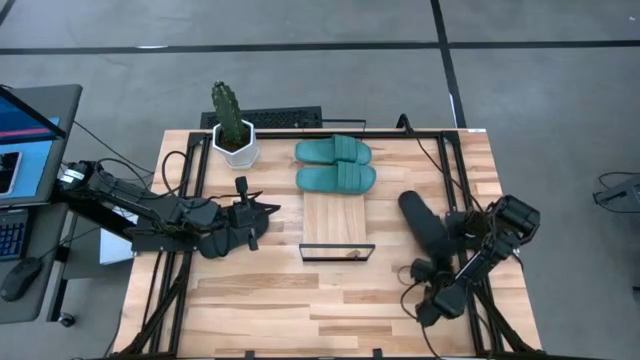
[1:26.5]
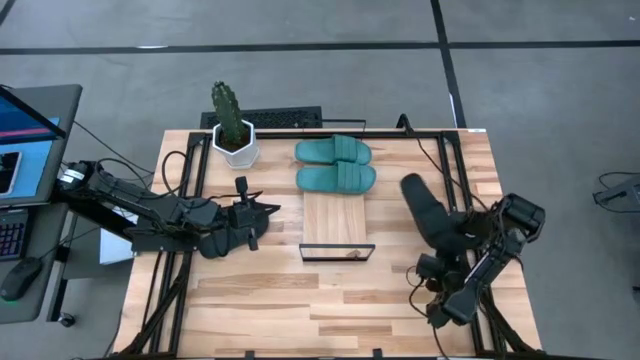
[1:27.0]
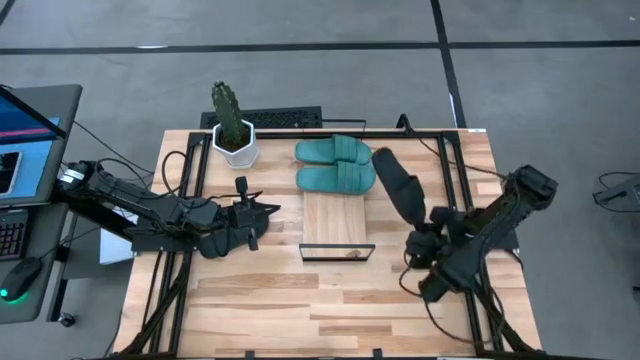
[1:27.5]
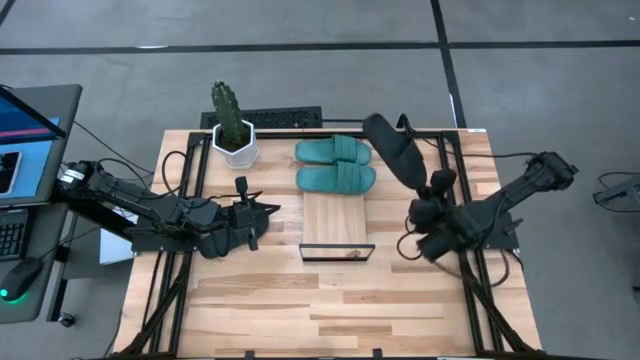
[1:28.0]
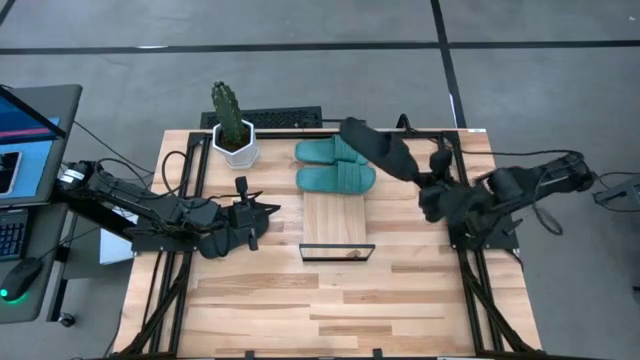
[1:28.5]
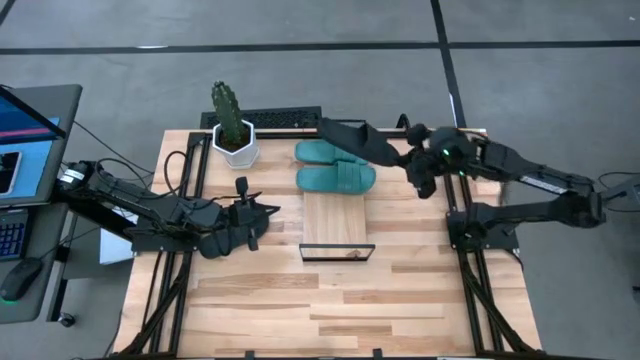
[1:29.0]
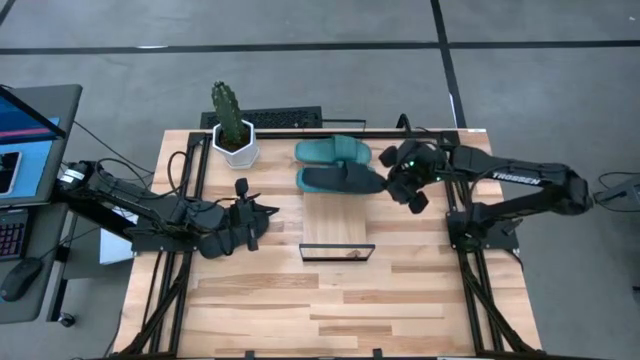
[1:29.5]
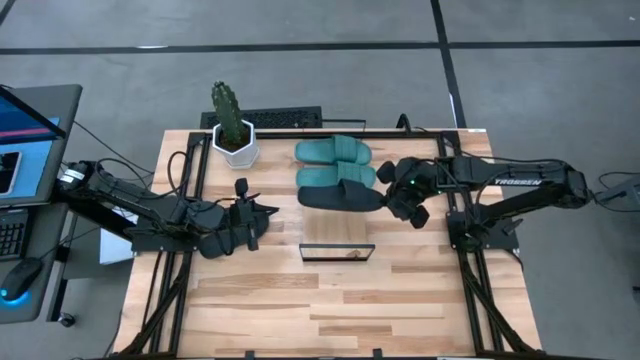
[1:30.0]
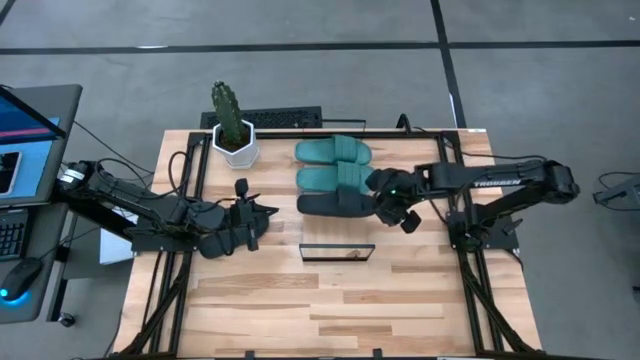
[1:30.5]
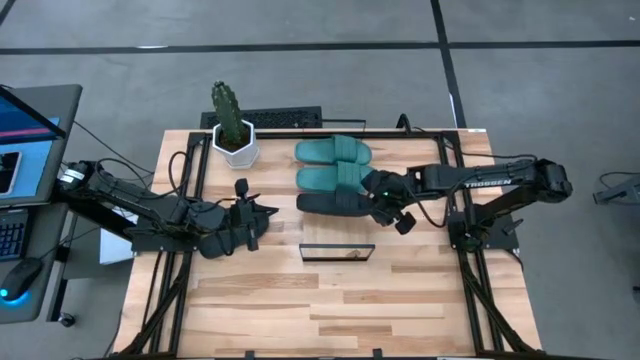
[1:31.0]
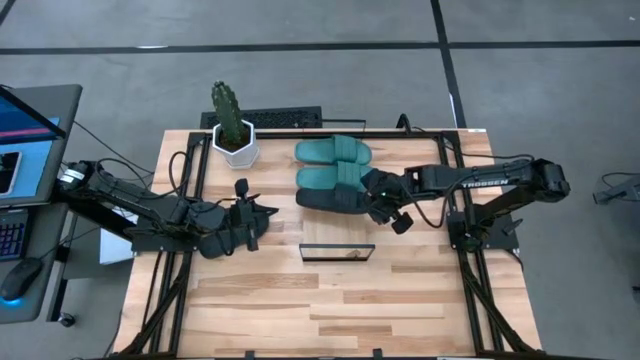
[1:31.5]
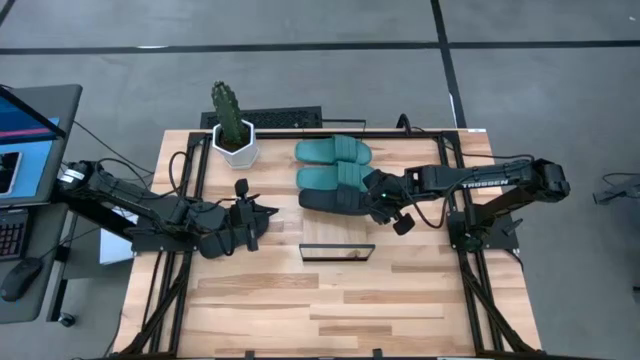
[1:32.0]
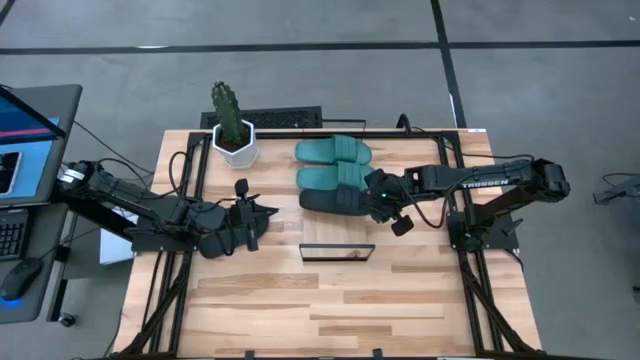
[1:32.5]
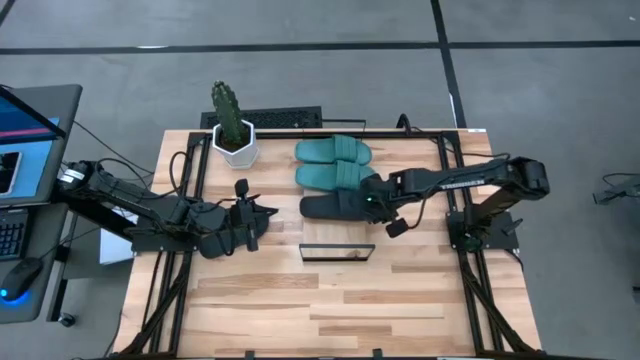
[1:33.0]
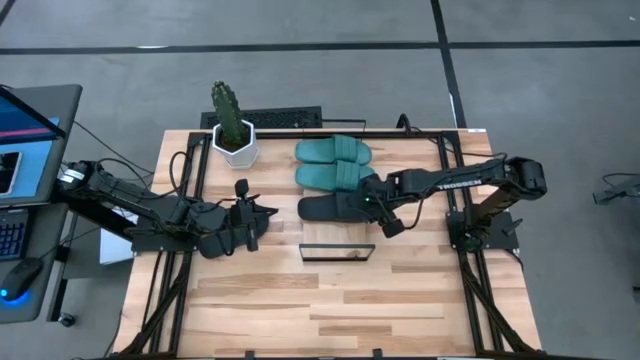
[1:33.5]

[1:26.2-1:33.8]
Task: Pick and place slides into the shelf
Put the right black slide on the shelf

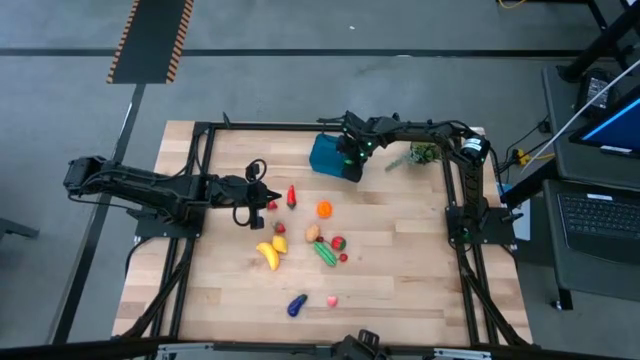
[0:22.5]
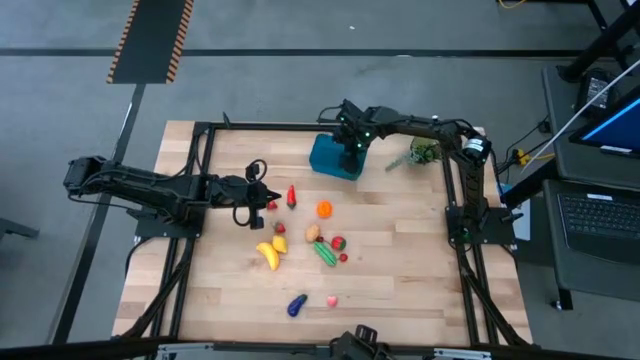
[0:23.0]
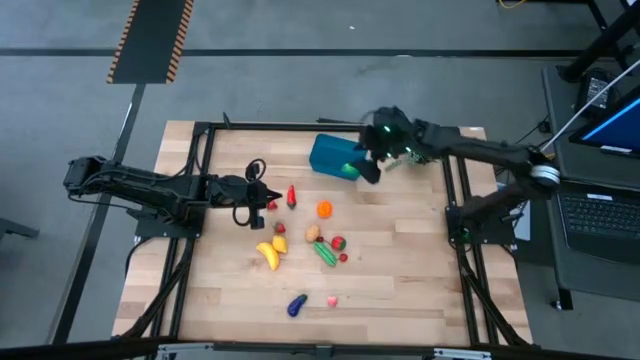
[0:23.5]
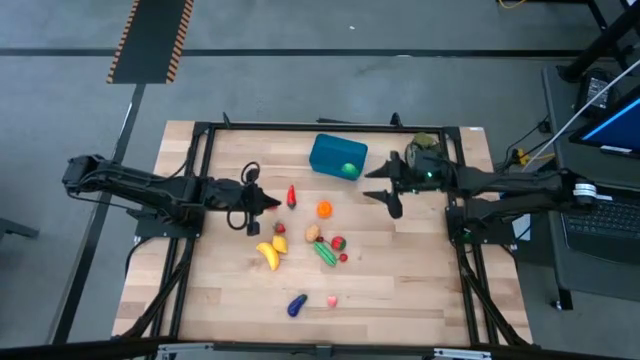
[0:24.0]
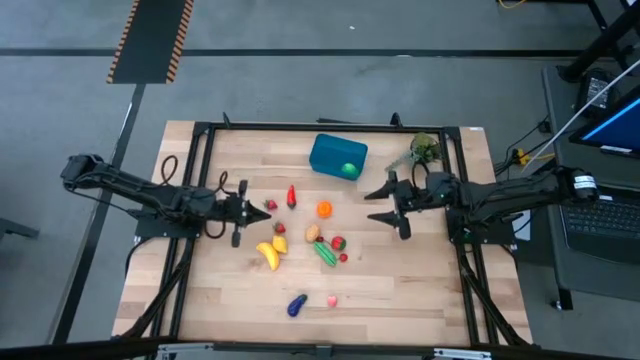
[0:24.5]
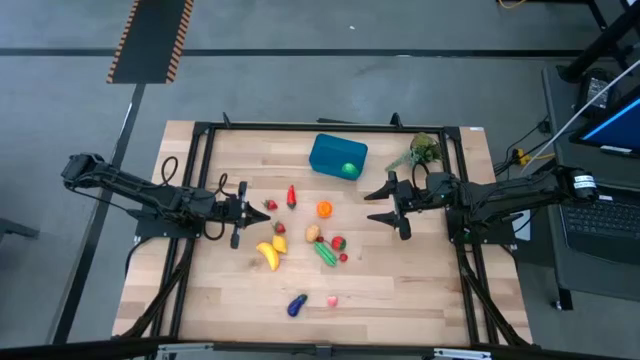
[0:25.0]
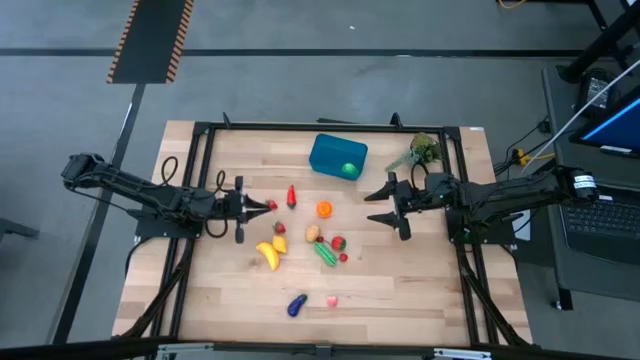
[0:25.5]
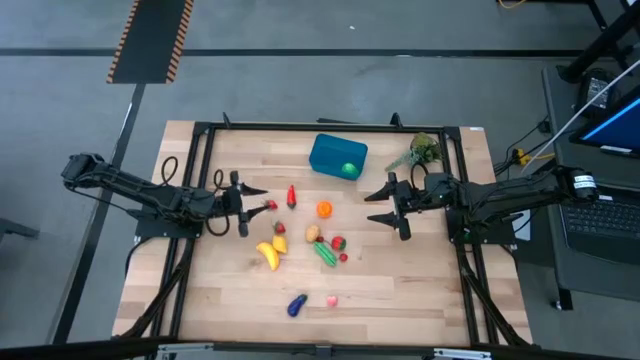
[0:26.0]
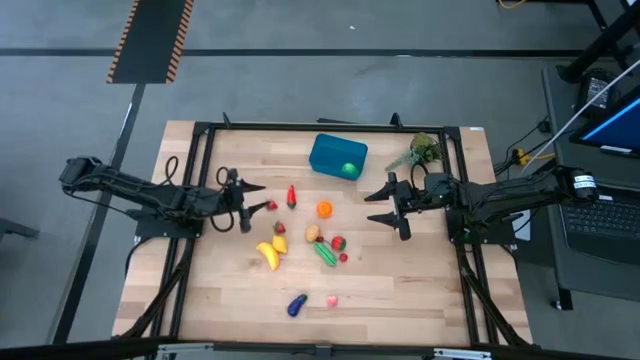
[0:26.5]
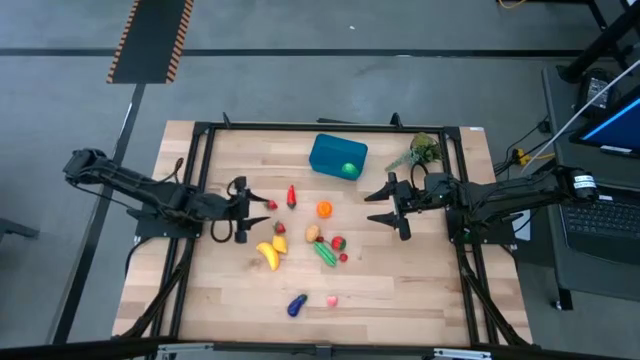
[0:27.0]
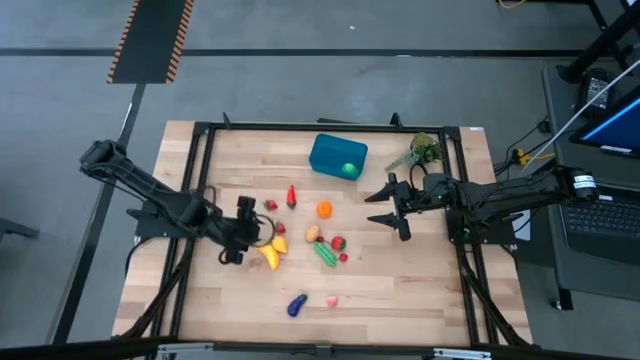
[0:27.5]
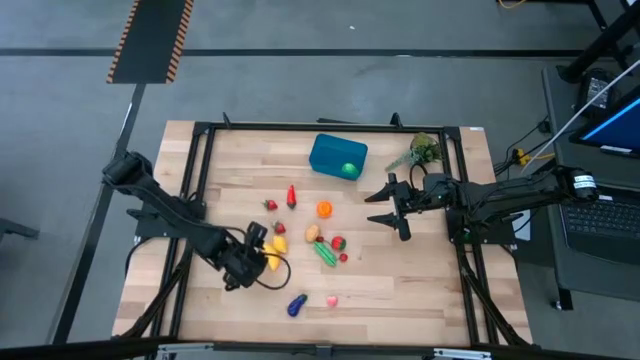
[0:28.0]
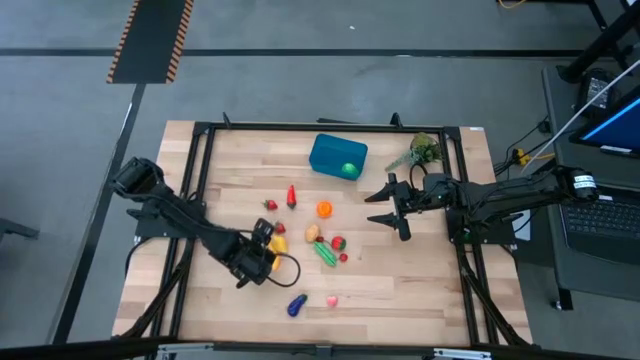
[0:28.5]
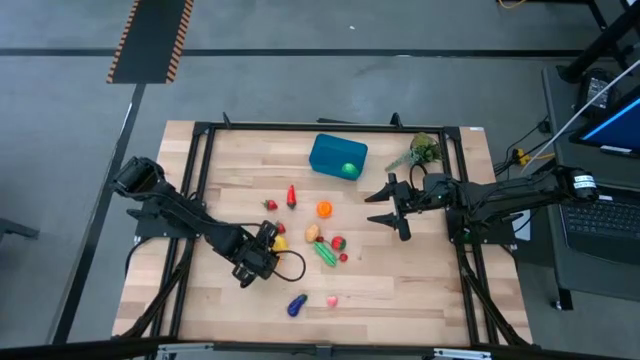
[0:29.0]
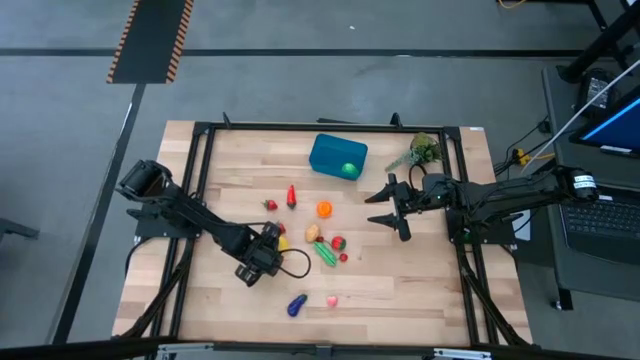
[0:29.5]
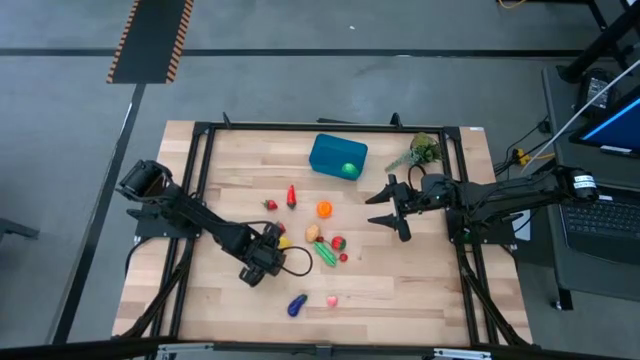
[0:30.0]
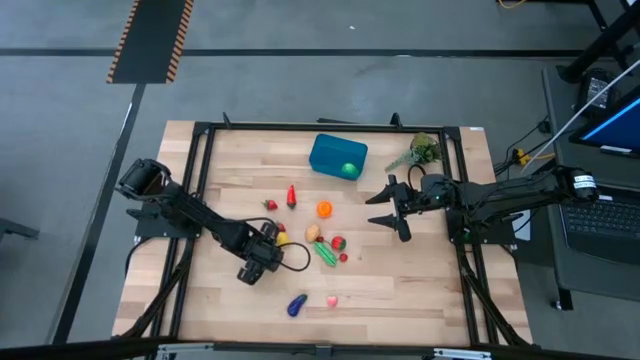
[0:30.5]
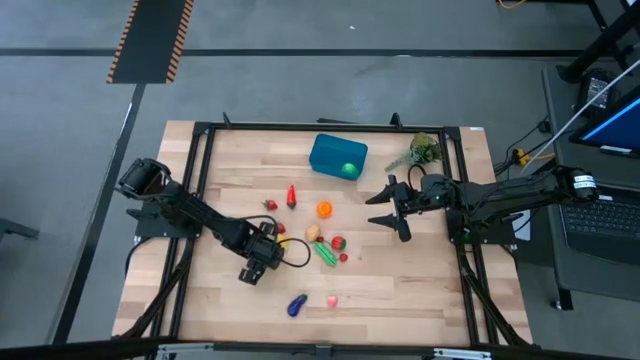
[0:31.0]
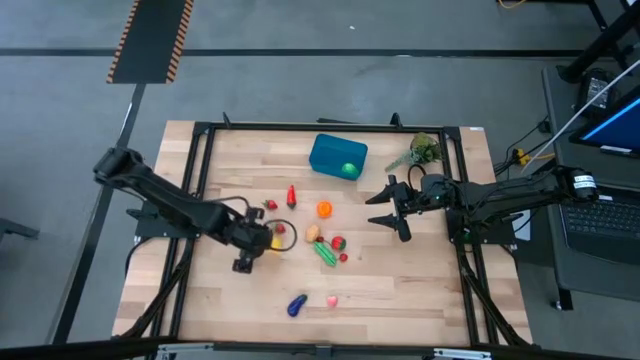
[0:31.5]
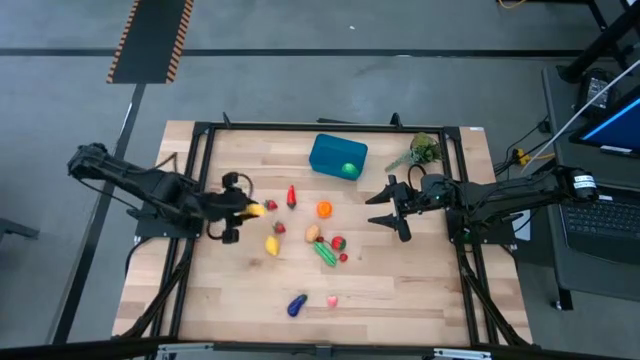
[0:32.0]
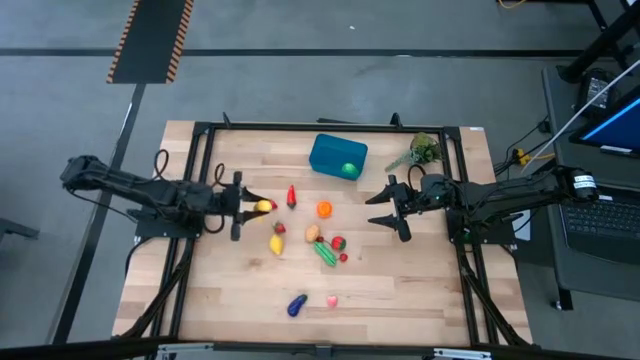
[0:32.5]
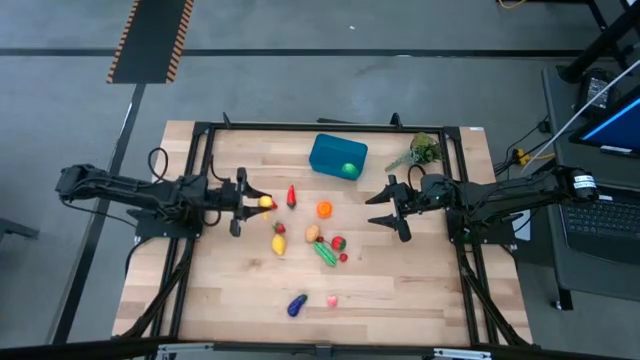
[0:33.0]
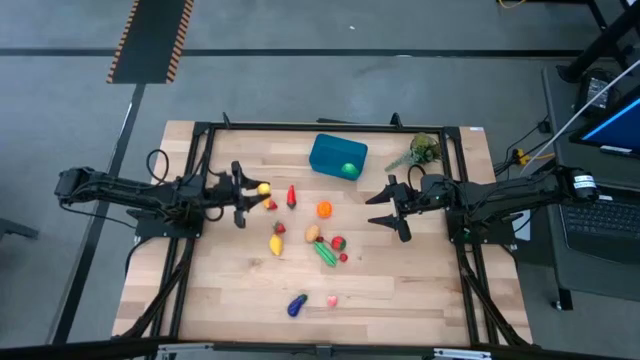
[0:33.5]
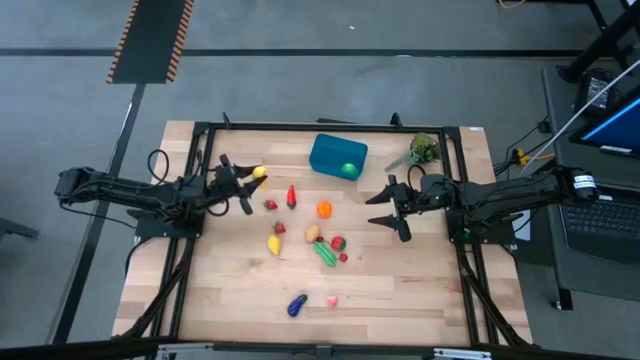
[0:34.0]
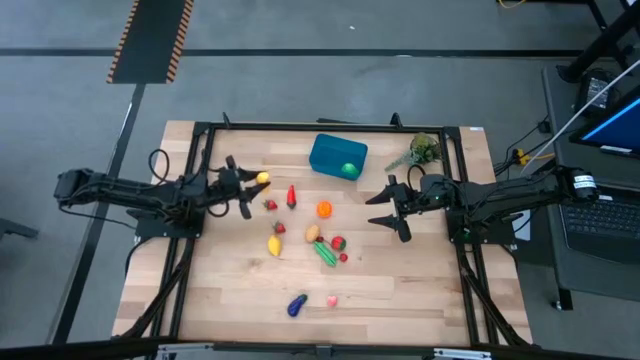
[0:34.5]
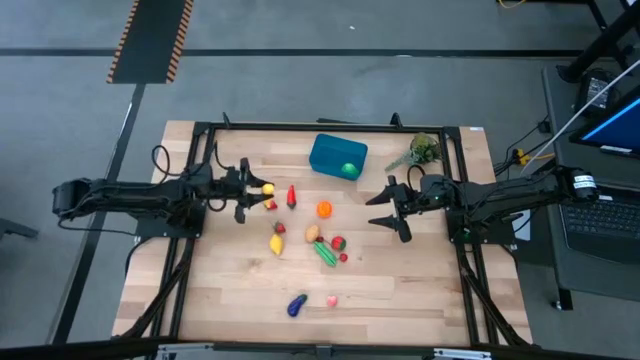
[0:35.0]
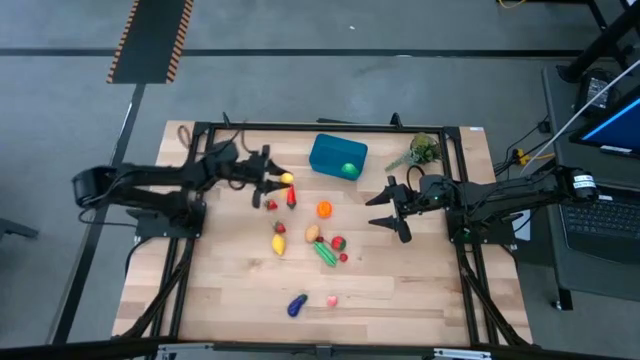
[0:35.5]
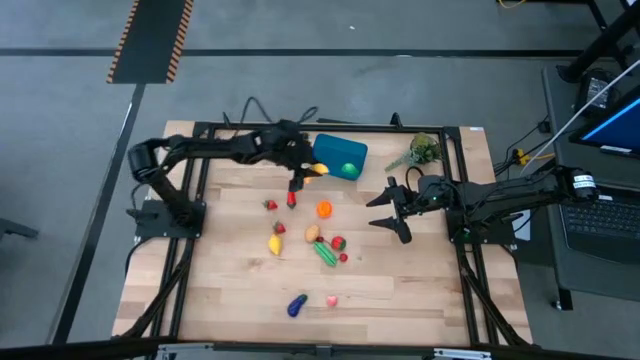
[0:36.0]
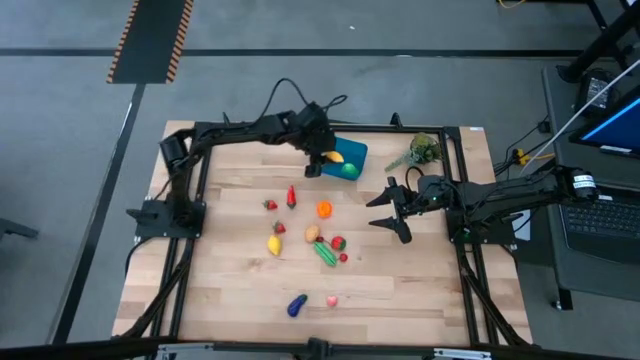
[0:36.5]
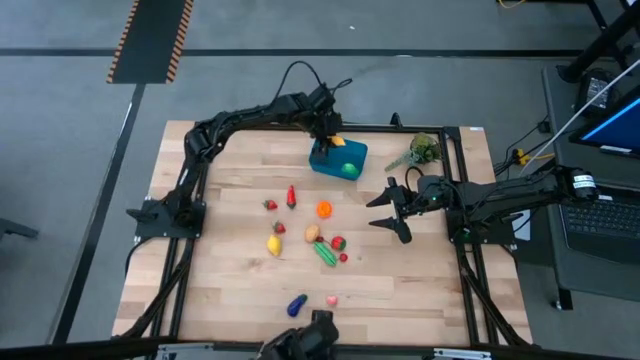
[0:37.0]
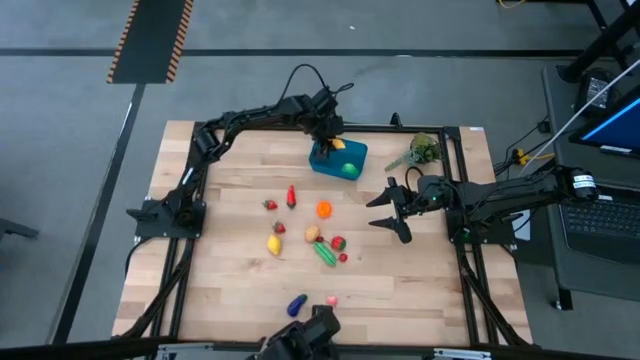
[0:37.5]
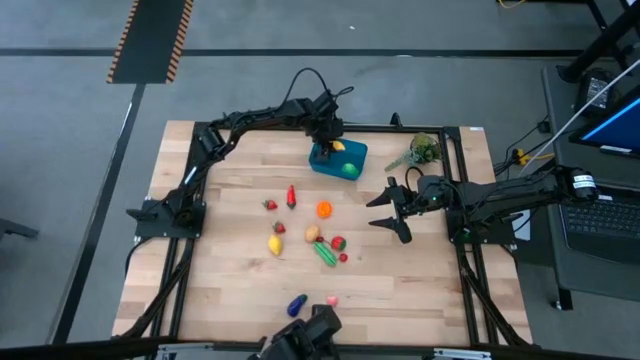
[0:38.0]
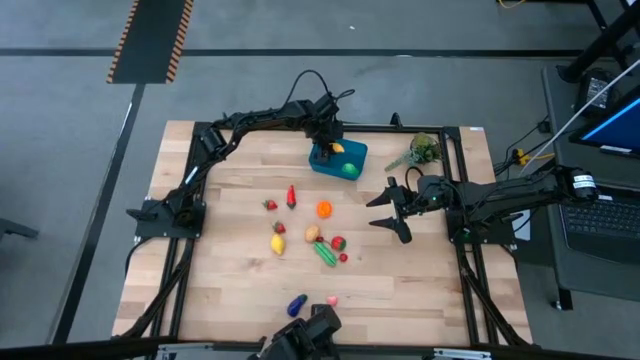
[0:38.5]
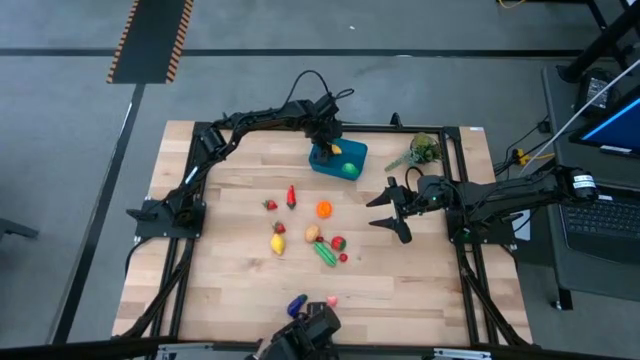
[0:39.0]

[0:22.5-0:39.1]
Task: Pick and placing Produce into tupperware
Put the yellow banana into the blue bin
